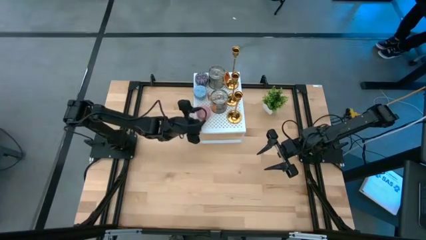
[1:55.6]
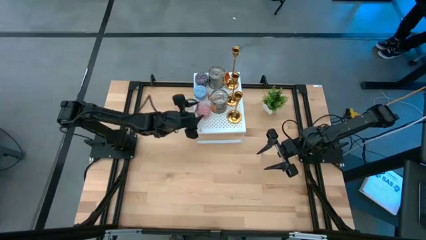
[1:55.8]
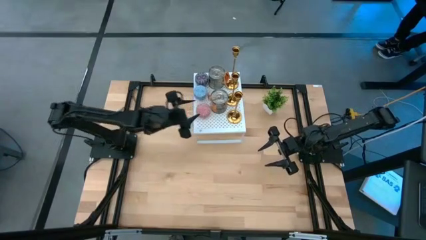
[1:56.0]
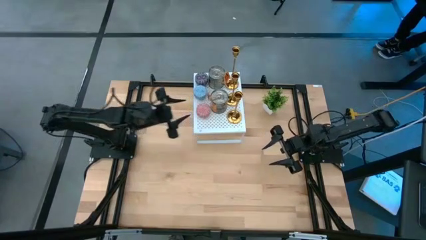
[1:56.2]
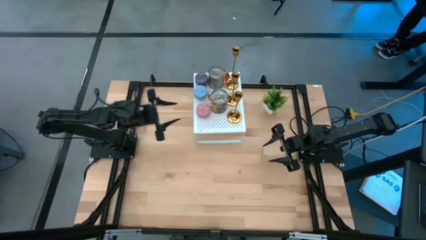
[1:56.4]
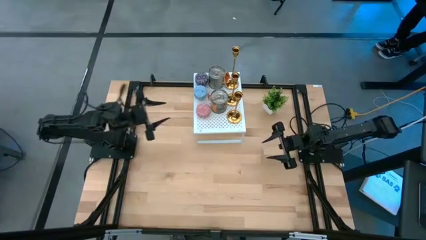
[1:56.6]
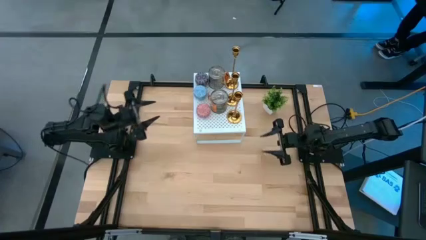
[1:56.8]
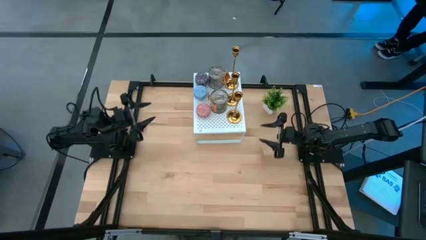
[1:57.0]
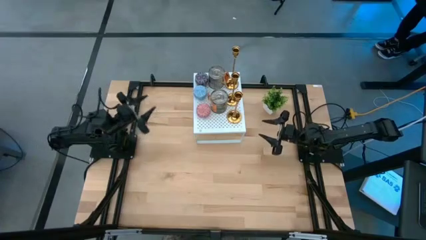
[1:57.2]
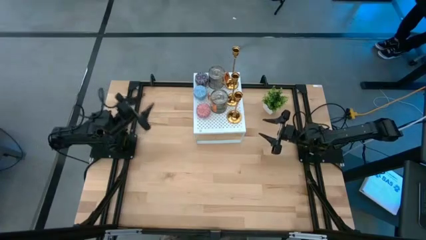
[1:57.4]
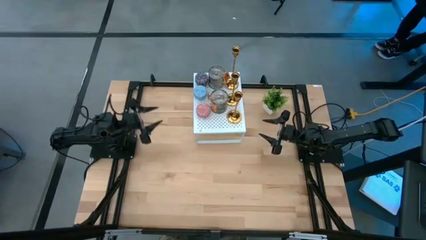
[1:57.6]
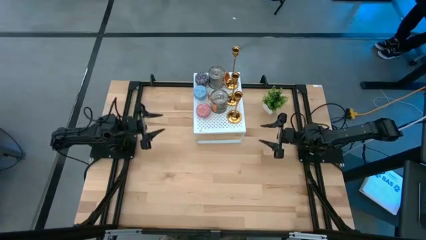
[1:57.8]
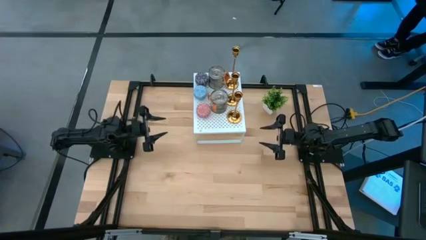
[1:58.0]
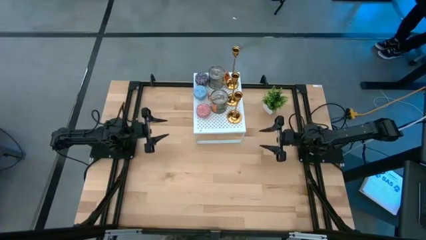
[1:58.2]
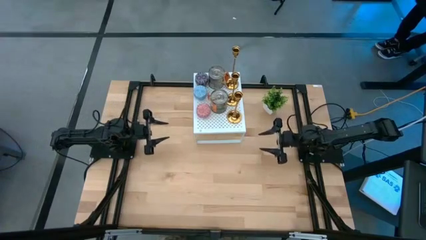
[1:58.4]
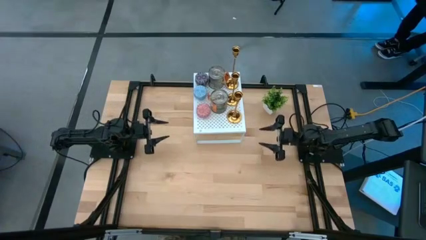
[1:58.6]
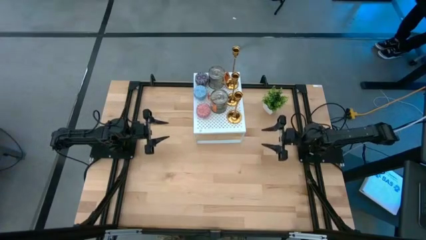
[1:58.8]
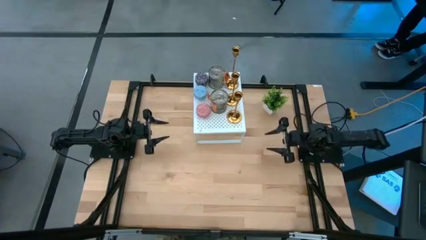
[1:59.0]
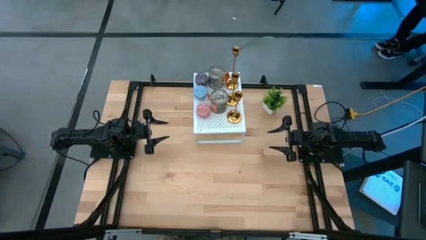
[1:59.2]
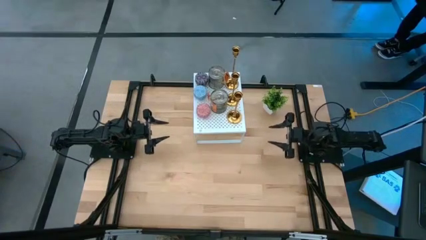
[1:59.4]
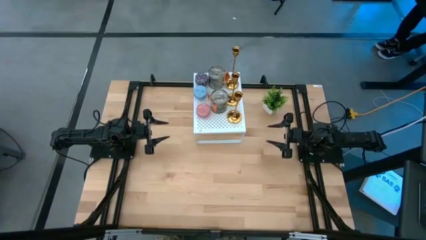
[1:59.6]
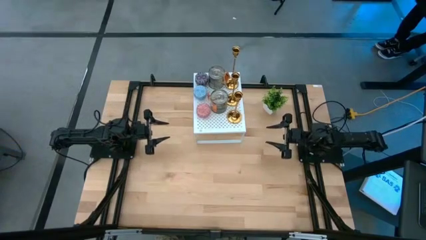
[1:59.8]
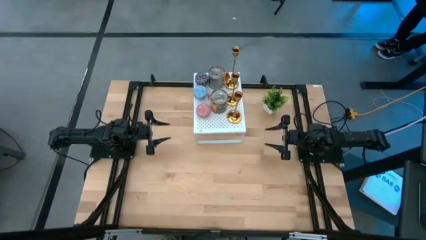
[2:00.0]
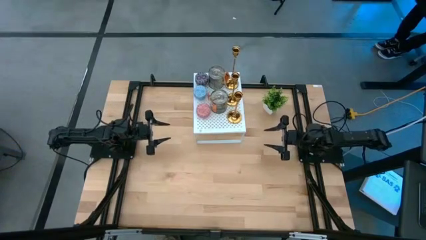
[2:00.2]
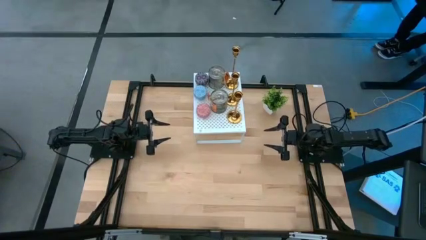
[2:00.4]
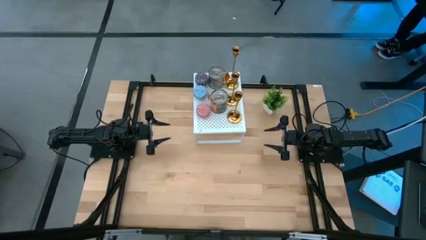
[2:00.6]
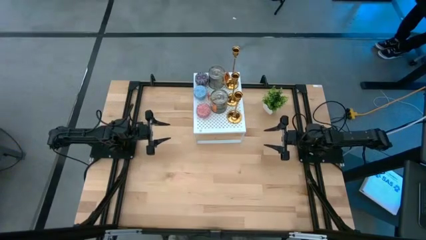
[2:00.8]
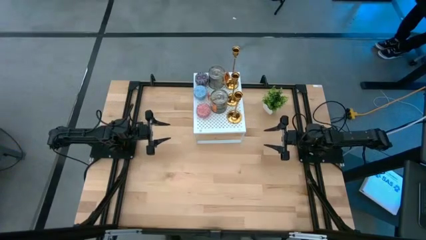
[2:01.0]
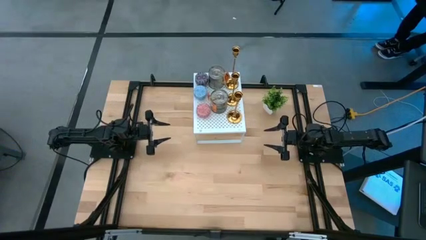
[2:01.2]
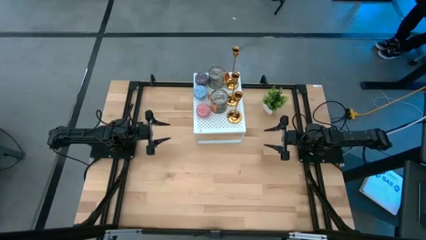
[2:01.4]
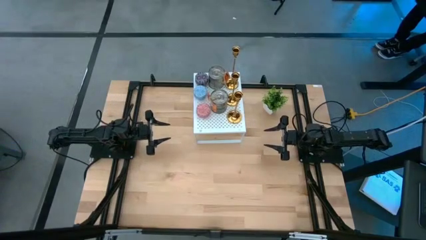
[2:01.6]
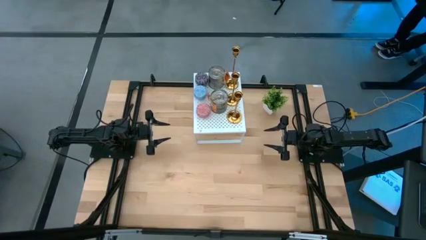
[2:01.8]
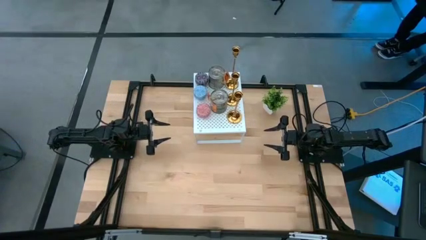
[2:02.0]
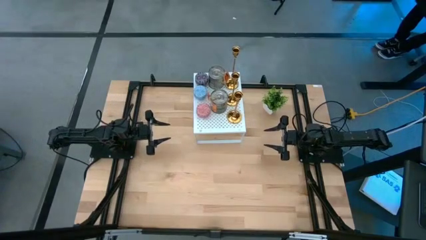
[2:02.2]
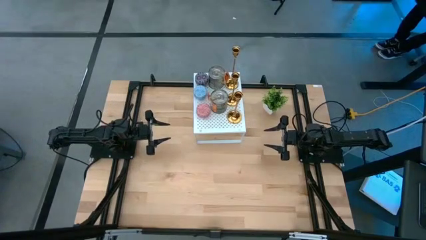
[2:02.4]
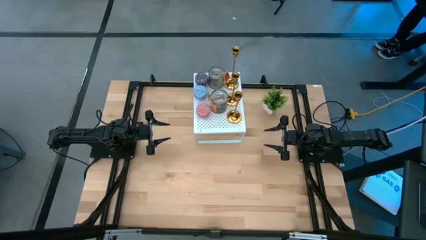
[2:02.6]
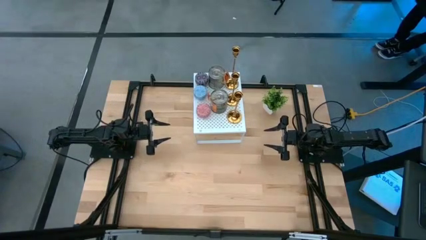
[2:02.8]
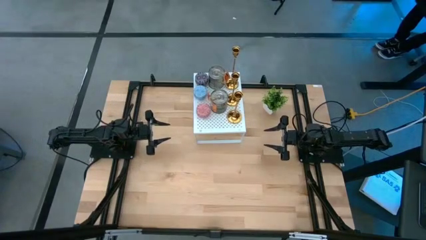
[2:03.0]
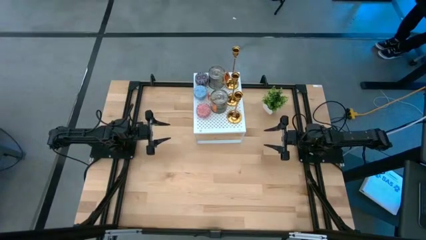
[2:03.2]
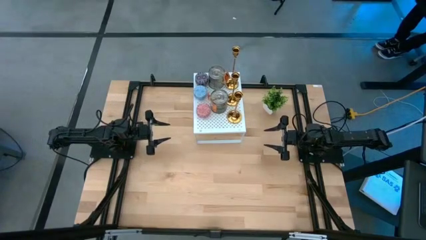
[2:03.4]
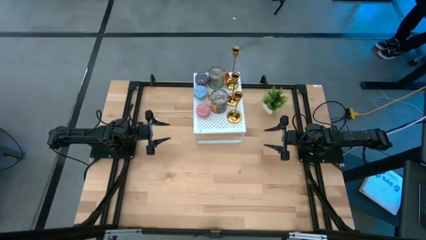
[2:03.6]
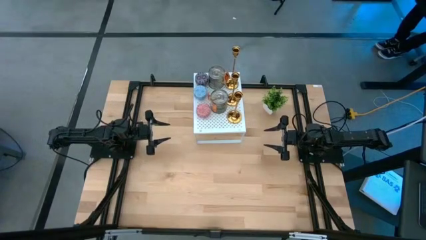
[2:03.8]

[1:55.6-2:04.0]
Task: Pick & Place candle stick holders
Return to Home Position

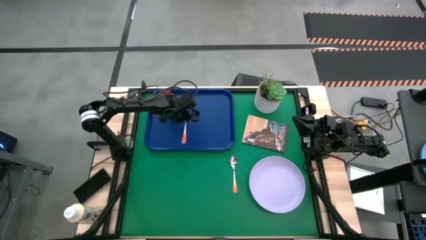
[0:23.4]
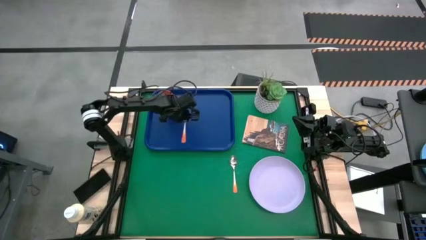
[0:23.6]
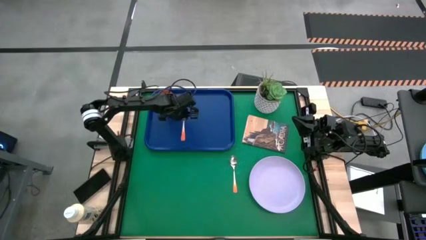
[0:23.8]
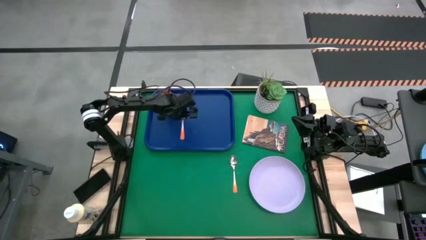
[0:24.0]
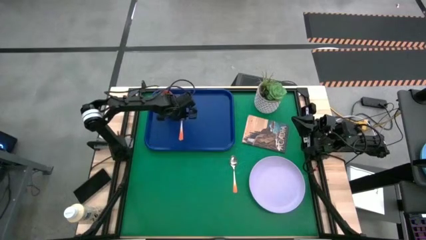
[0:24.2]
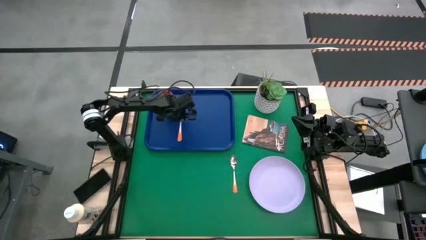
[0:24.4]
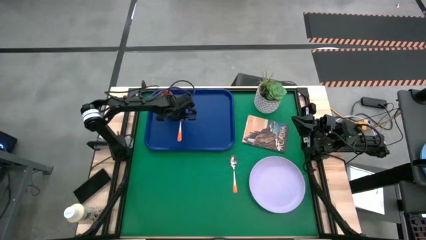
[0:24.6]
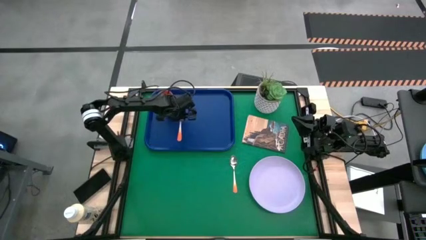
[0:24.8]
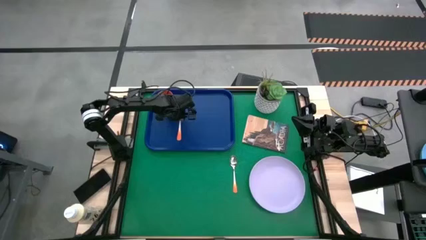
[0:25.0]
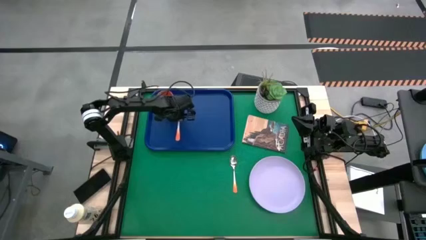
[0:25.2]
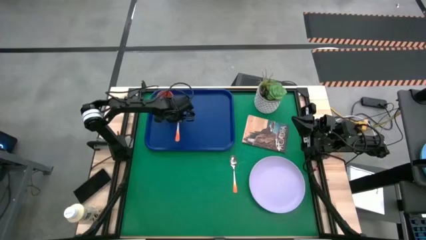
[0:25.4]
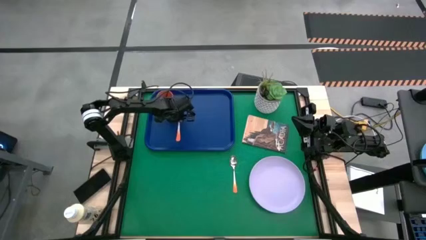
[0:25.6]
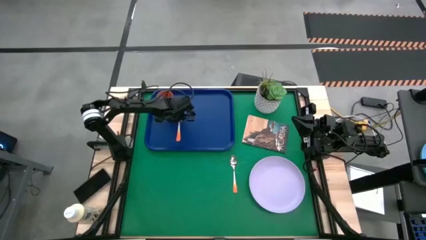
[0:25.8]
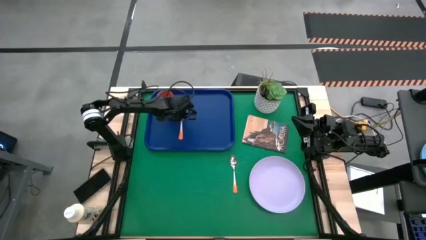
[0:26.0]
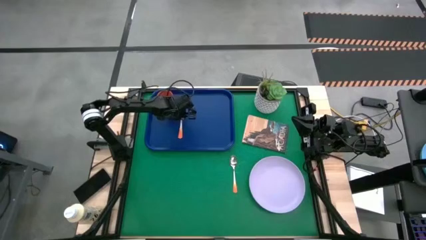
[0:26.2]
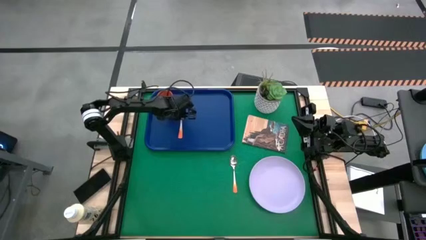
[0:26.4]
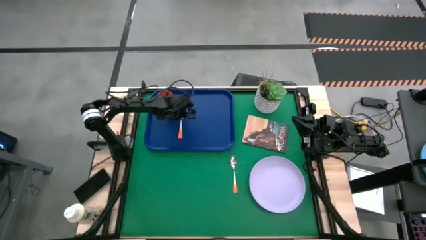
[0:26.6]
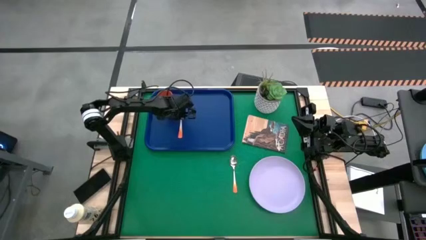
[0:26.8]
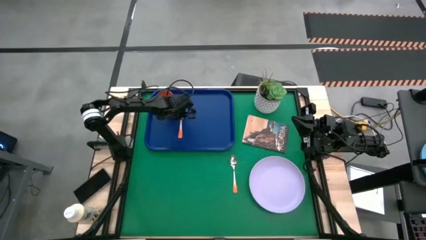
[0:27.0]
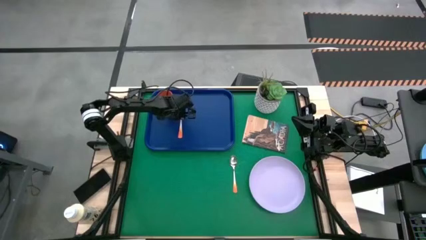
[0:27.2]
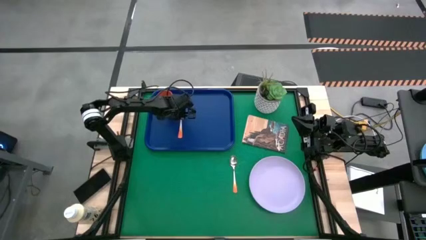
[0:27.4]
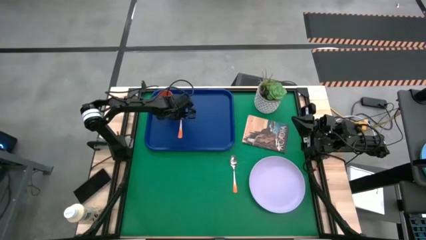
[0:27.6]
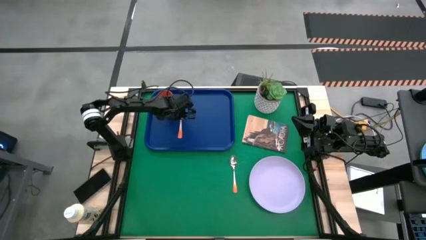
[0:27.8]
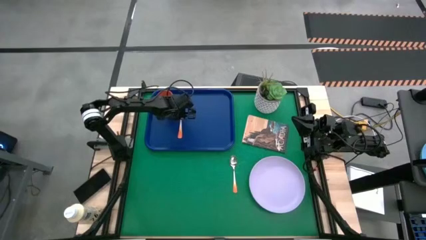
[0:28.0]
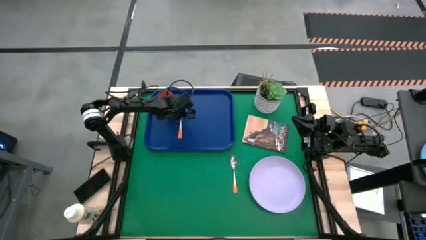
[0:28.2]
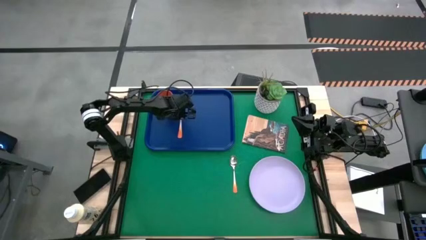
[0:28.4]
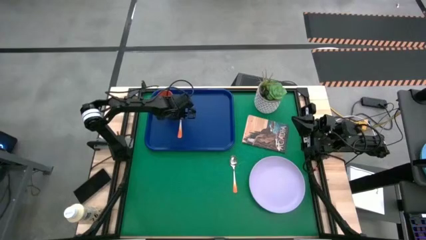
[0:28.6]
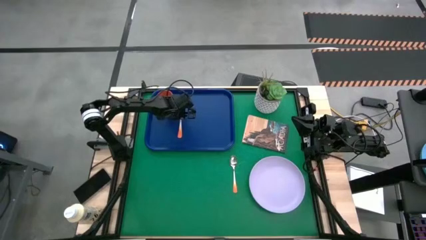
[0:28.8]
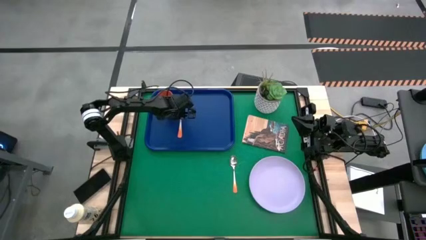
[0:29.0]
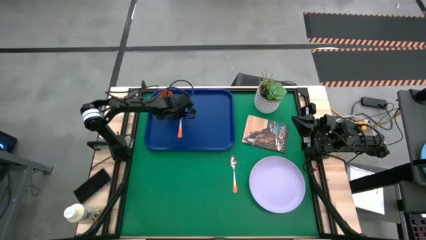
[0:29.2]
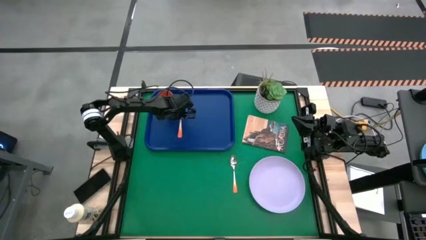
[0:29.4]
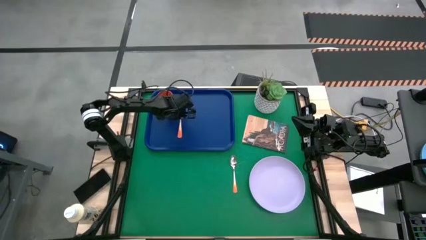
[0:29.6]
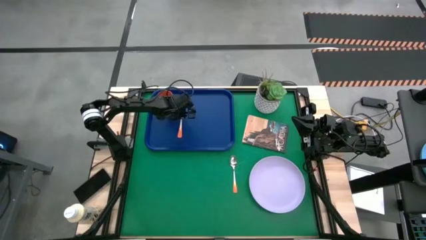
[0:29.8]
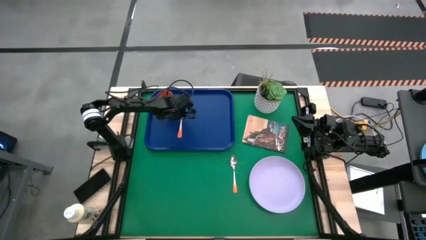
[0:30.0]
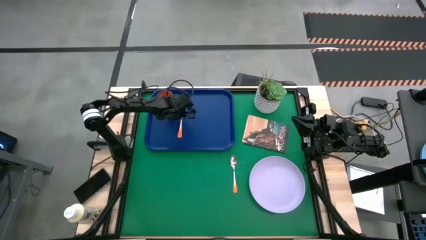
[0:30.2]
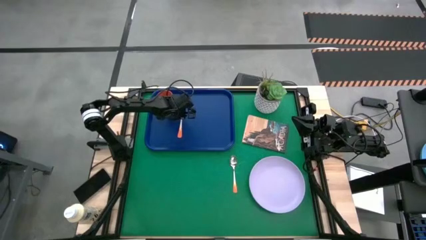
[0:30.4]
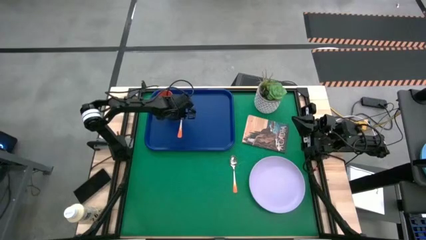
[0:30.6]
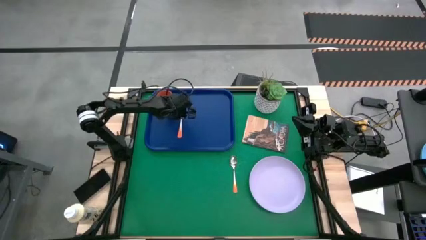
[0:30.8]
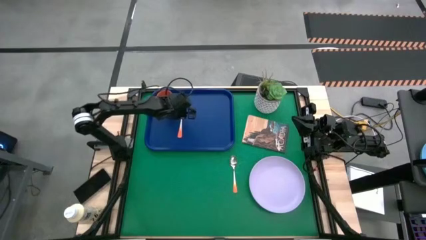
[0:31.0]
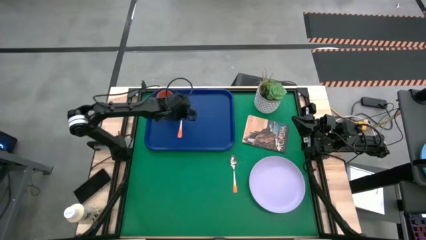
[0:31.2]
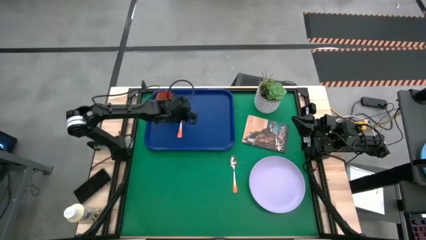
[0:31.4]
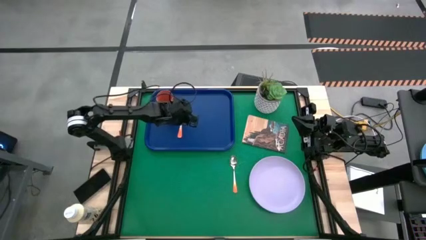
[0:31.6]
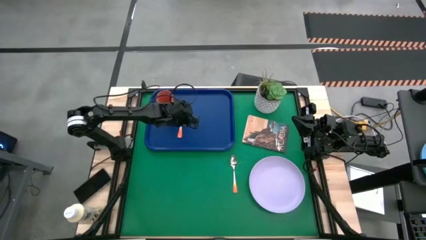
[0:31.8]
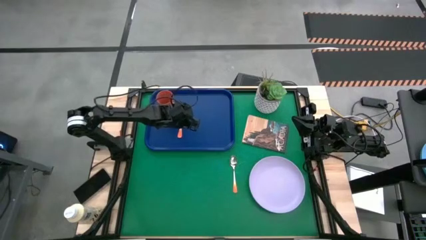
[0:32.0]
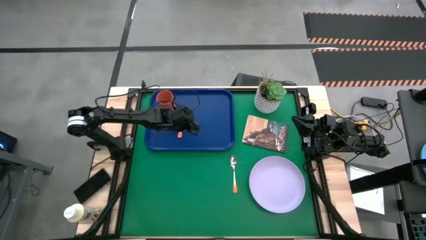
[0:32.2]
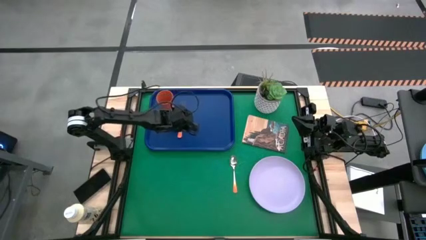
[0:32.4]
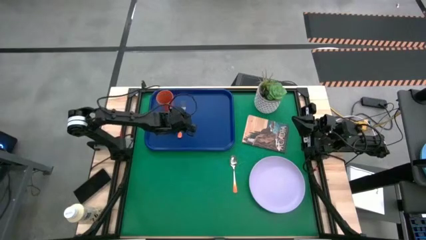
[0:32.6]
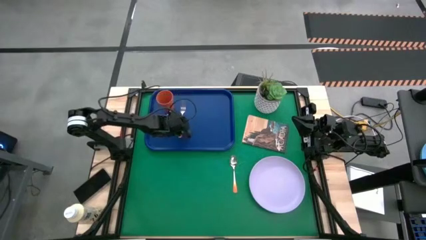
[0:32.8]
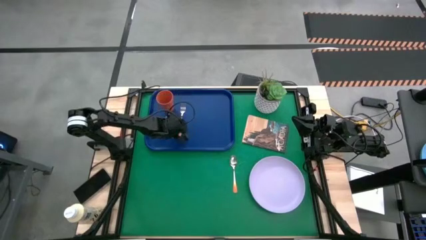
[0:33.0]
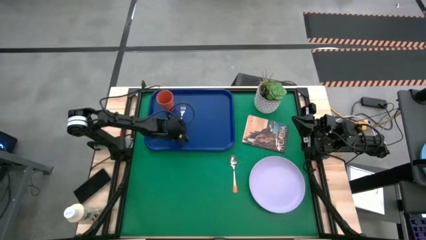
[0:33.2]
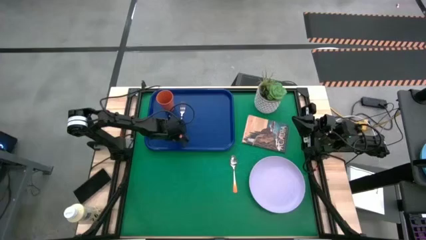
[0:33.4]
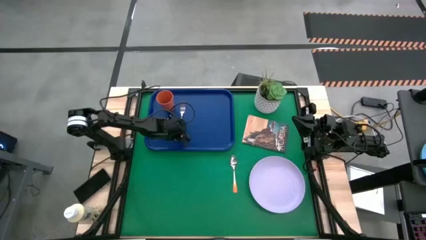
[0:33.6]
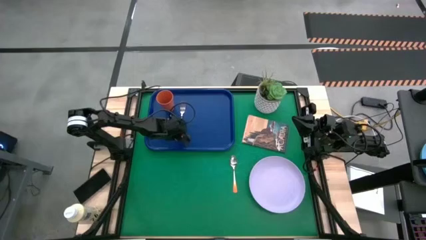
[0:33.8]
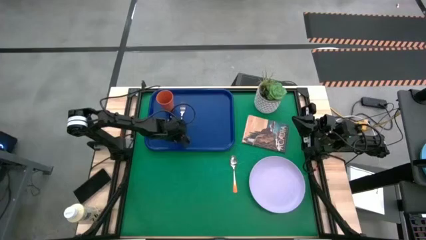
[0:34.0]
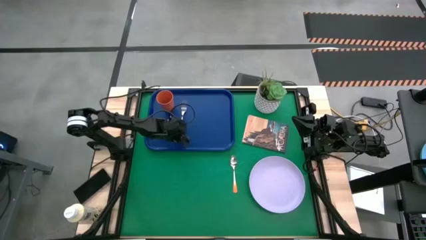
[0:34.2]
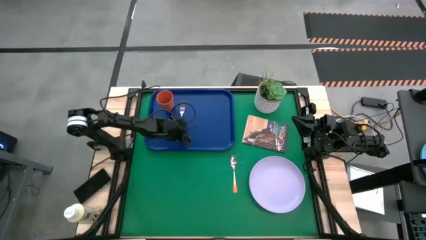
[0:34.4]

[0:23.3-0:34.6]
Task: Pick and place plate/cup/fork/spoon on tray
Put the orange fork on the blue tray to the bottom right of the orange cup
